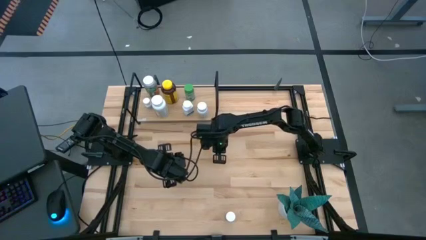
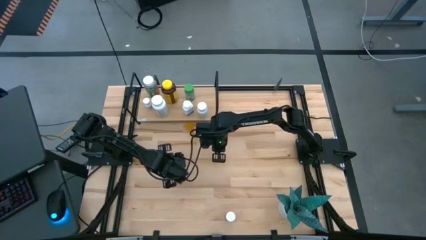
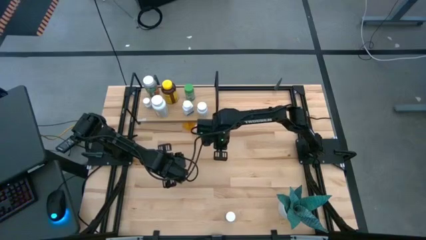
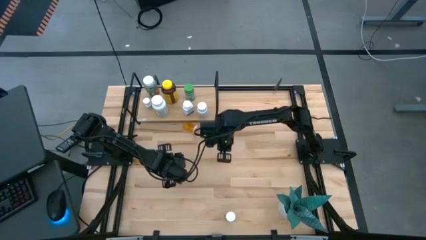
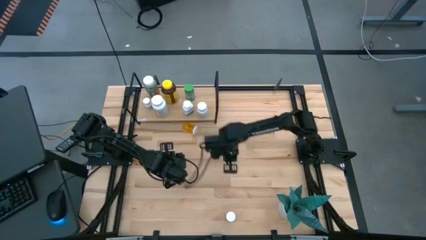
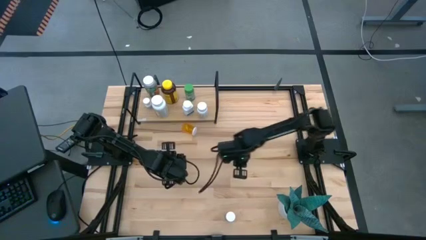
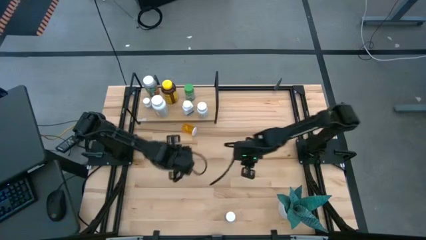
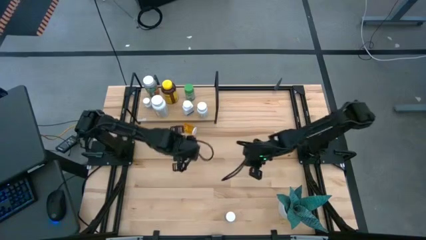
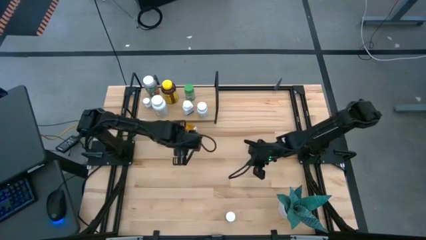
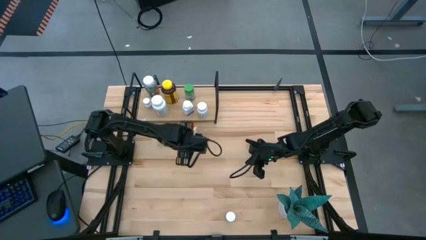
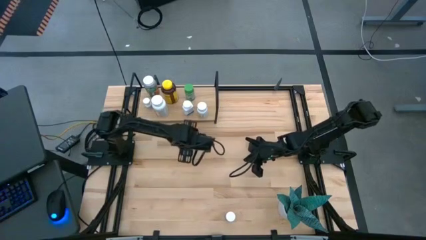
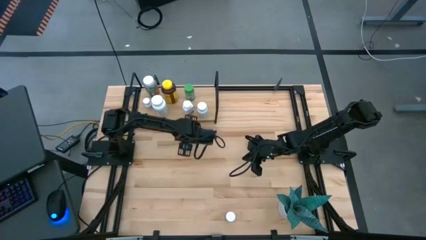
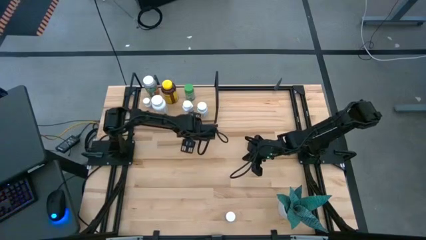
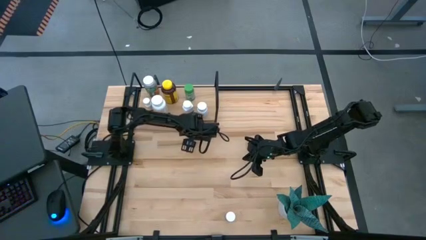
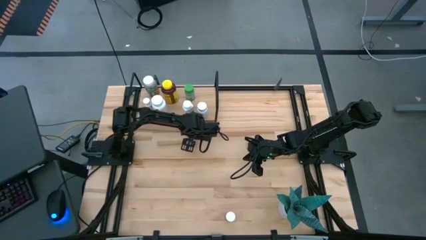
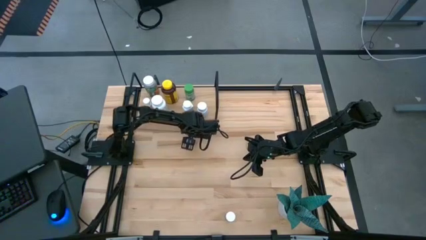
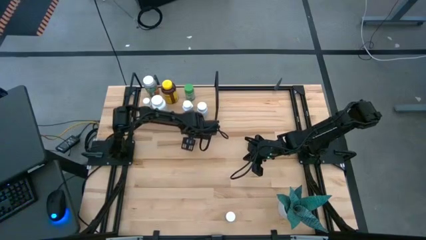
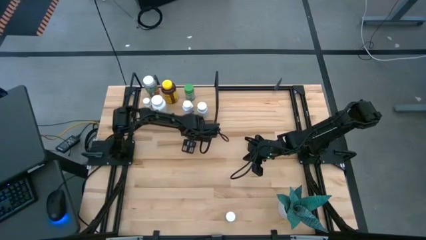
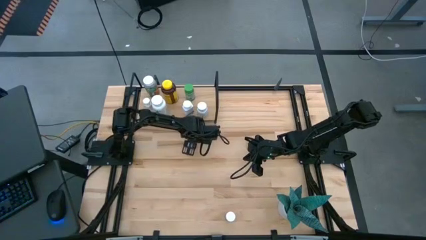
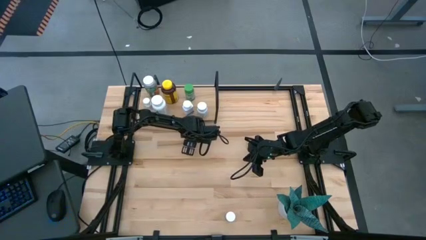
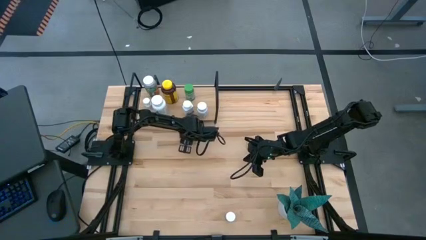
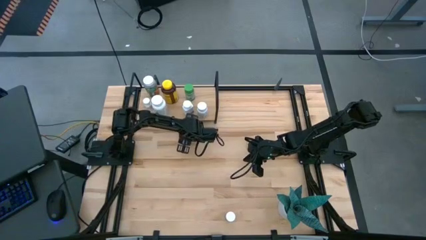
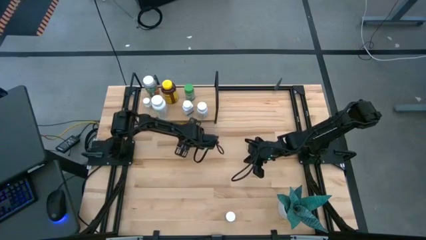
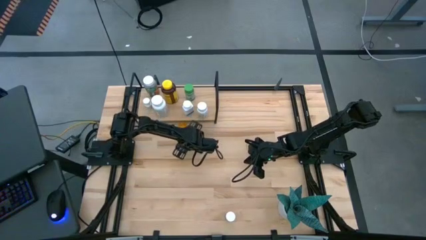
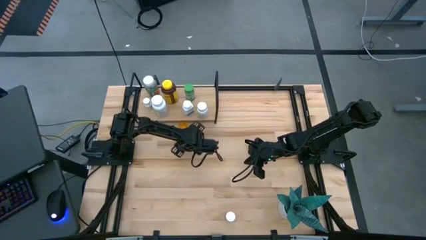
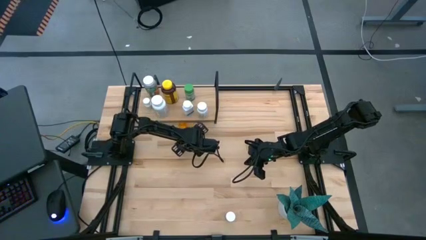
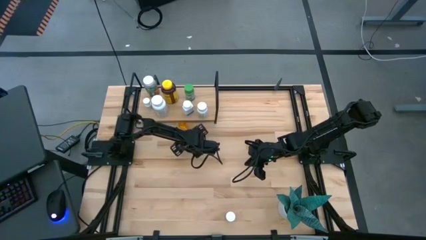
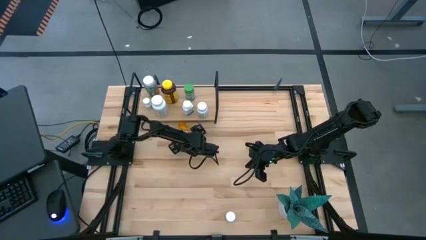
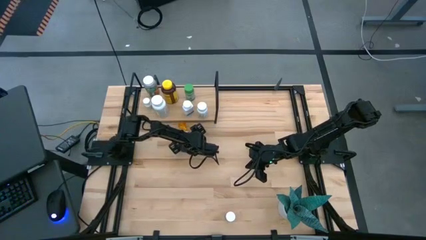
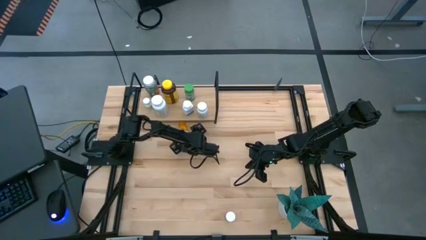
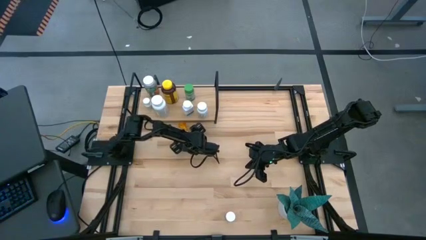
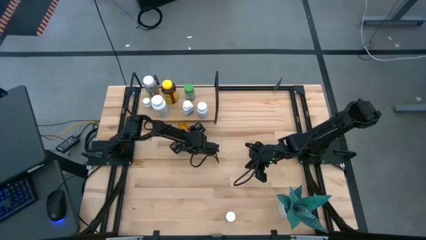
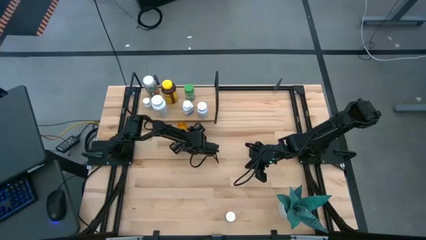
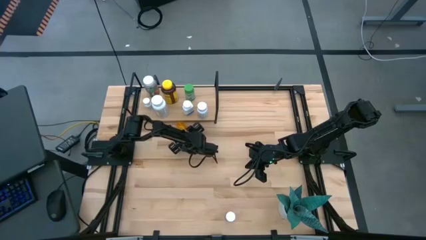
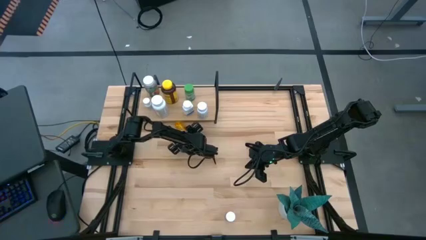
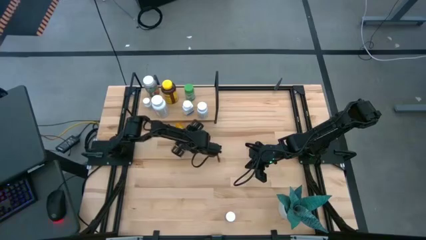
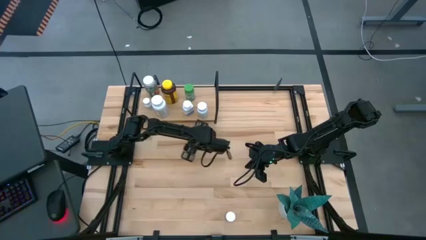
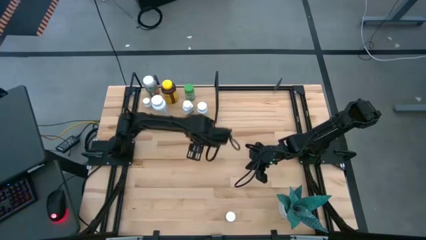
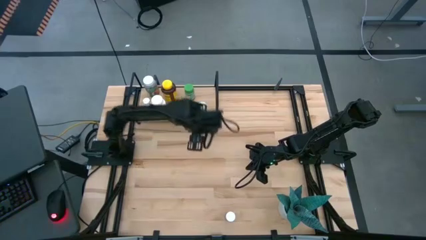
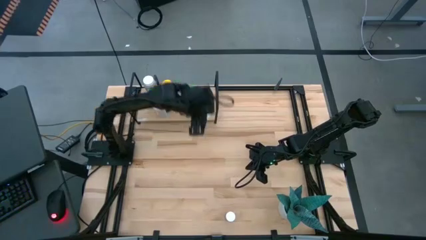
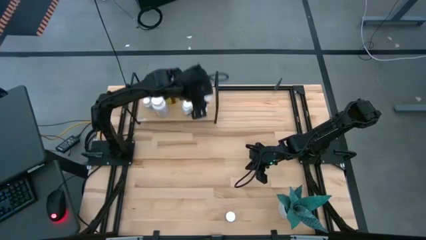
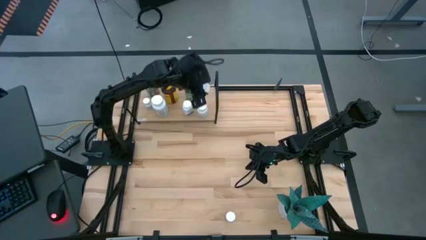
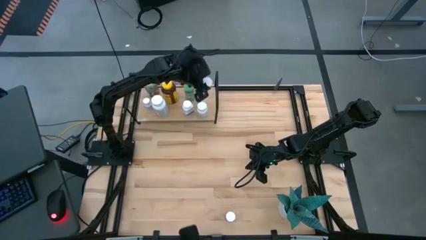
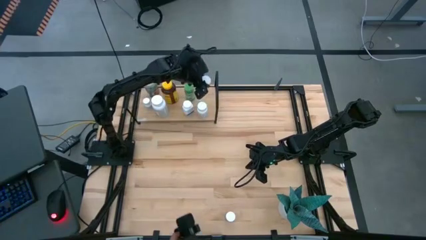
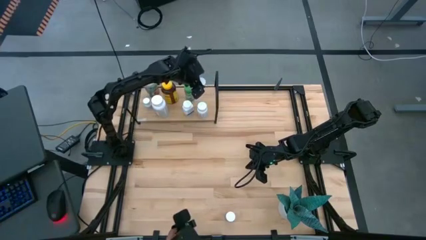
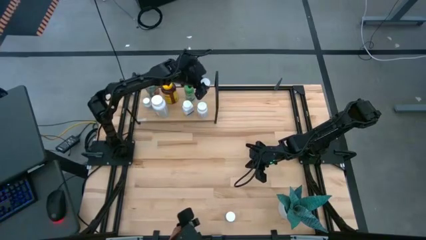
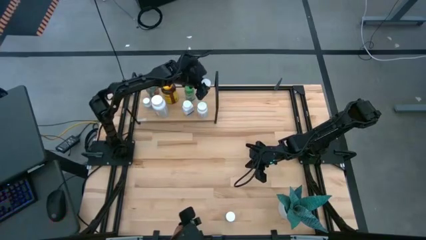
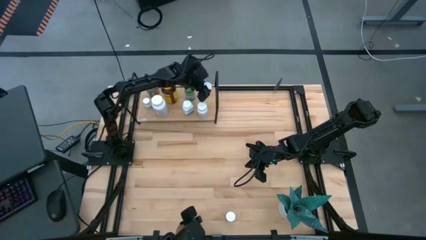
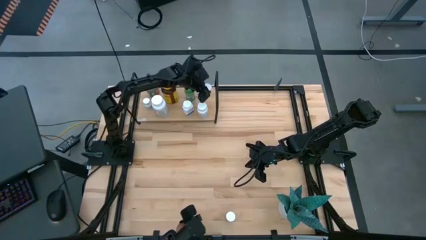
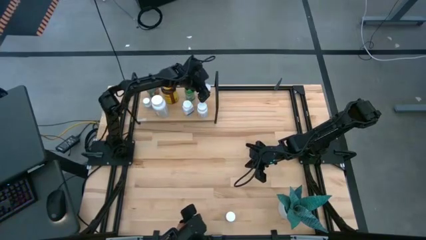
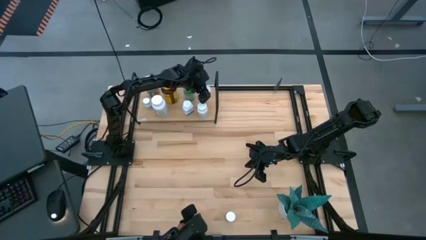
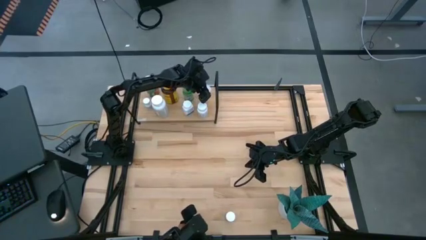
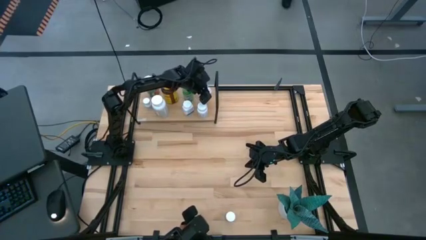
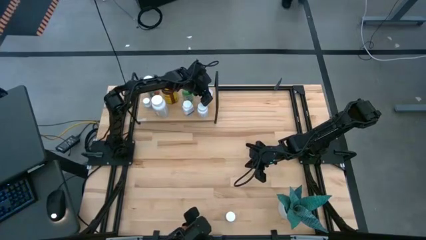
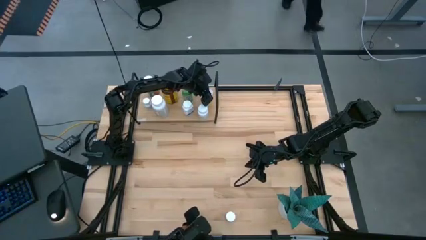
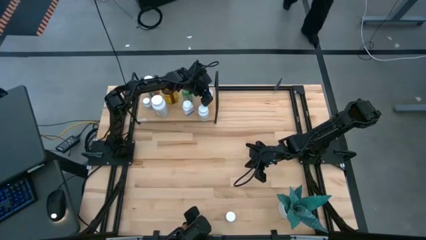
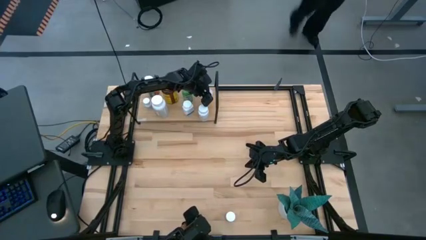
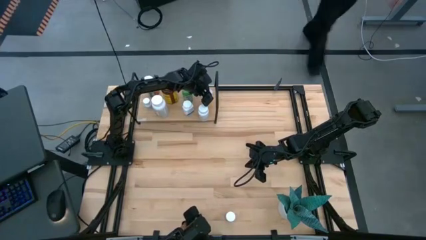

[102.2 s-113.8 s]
Task: Pick and place medicine bottles onto shelf by color
Put the orange pill bottle on the shelf

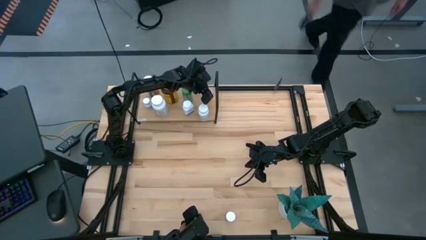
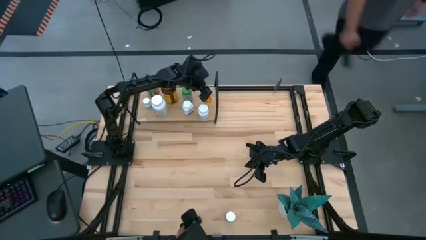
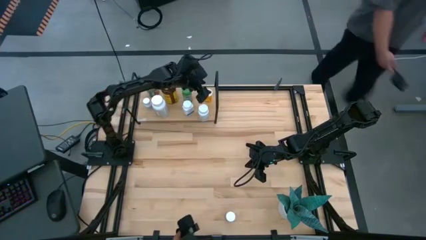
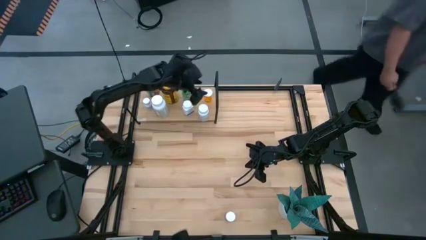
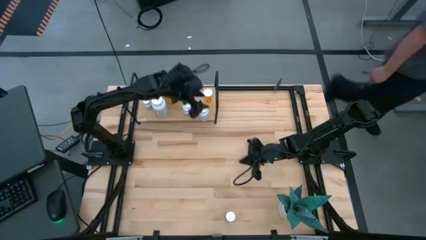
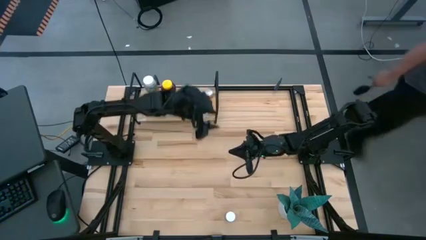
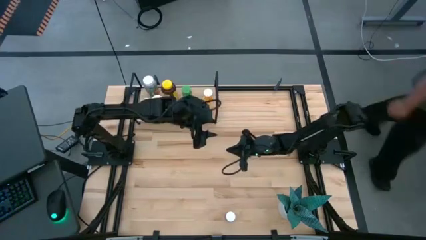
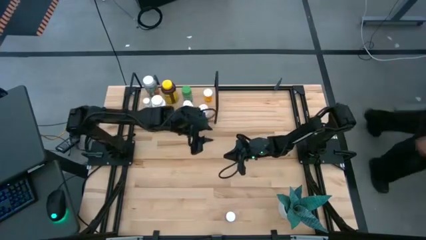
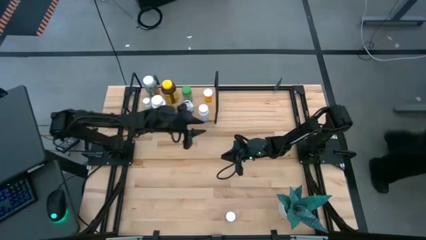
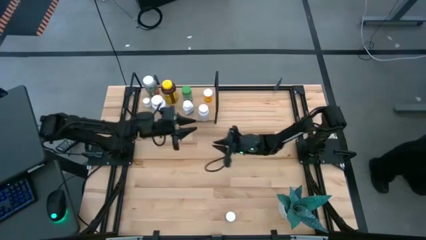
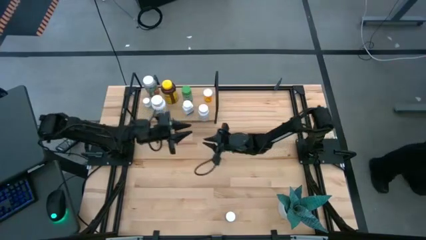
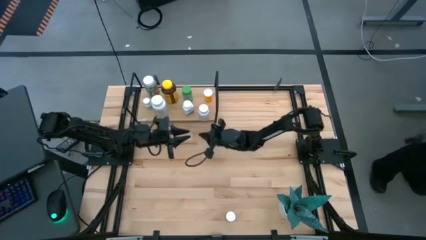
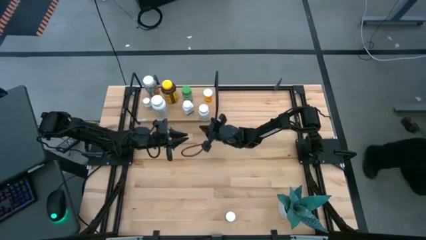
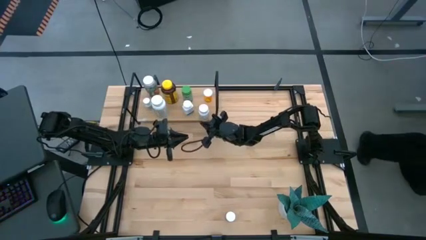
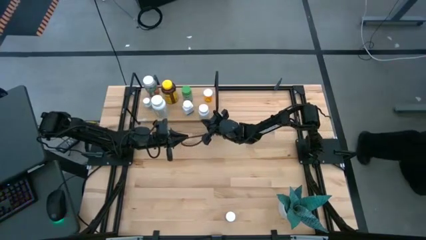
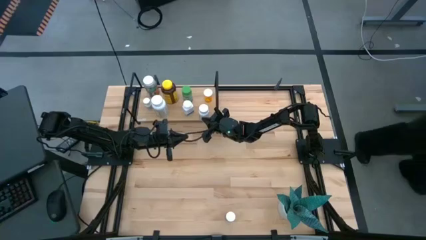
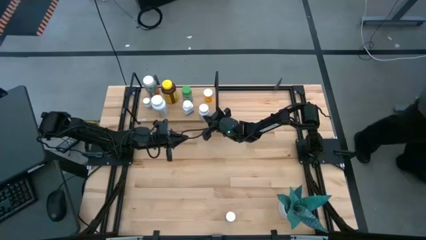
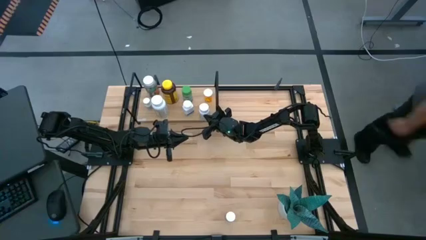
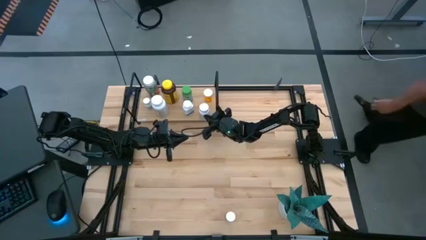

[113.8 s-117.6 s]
Adjust the white pill bottle on the shelf
